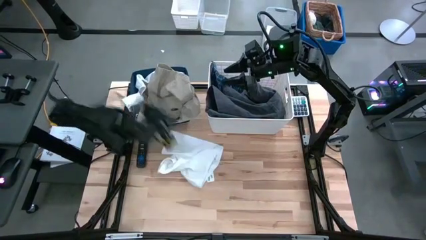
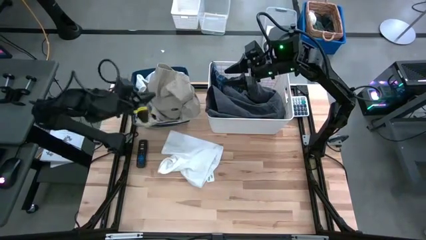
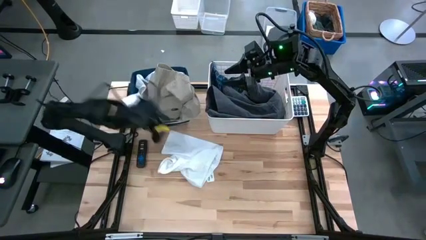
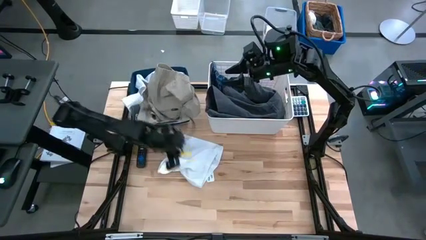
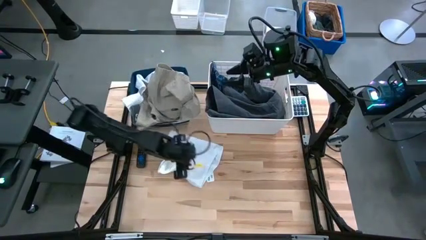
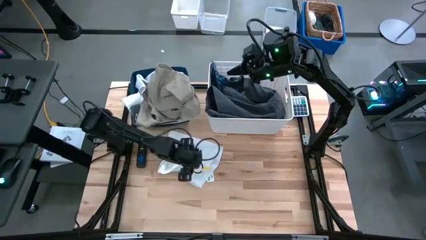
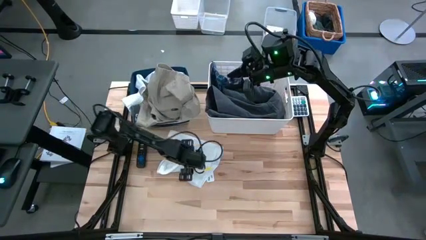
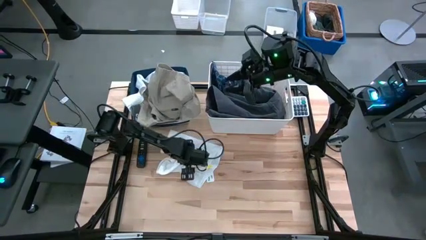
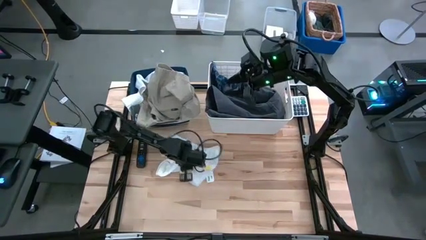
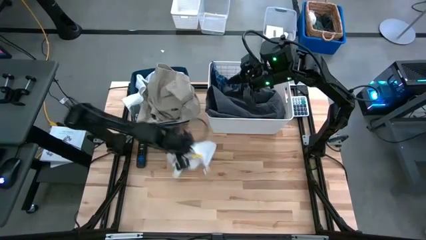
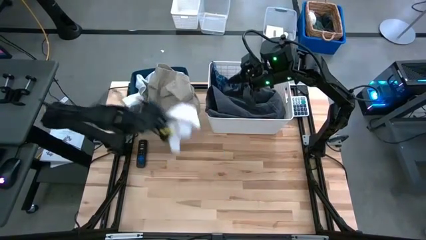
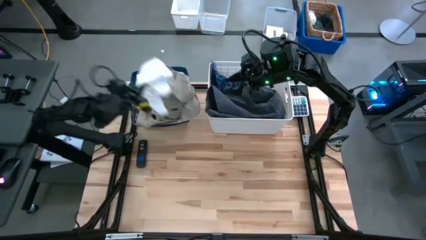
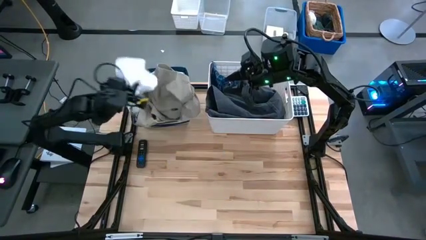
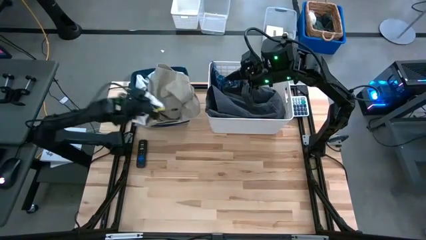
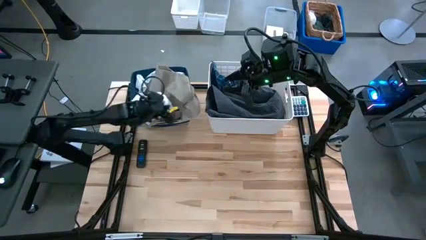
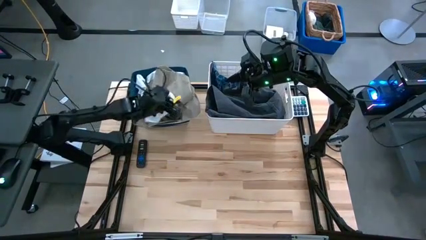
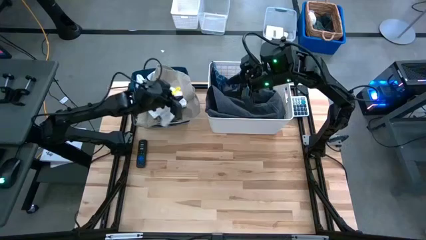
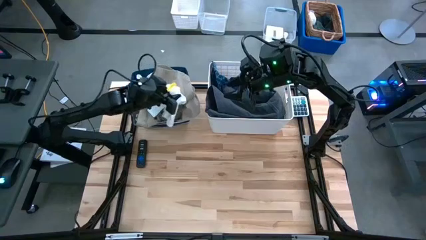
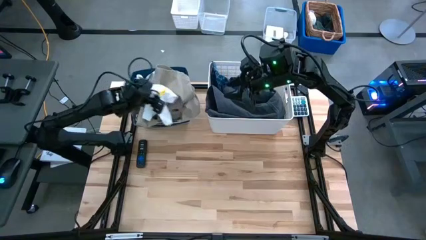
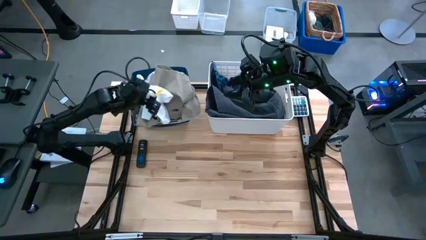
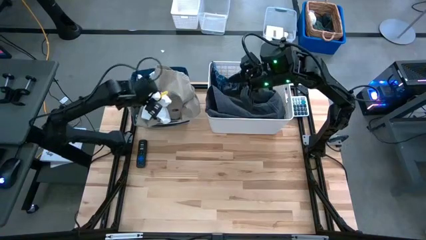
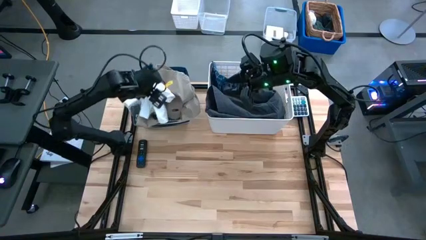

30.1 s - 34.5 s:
Task: Sort clothes
Put the white short into the blue laundry organizer

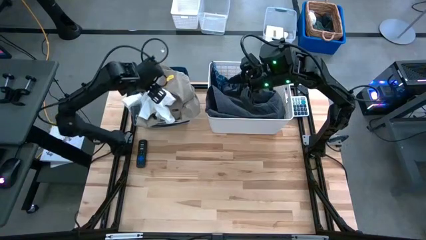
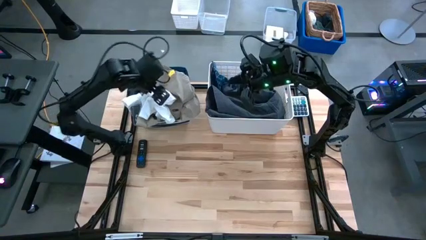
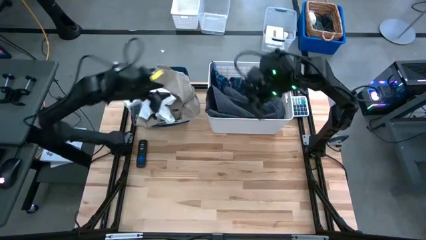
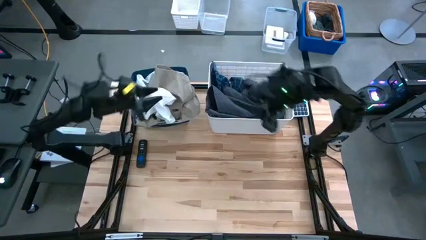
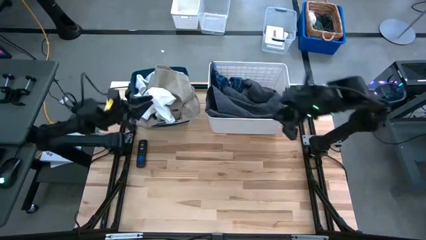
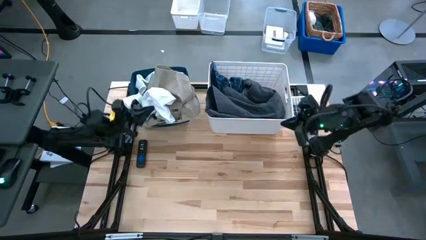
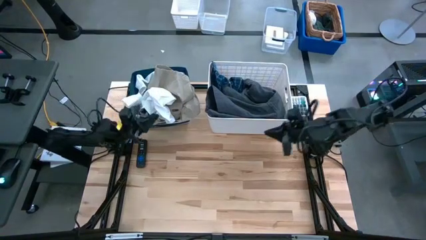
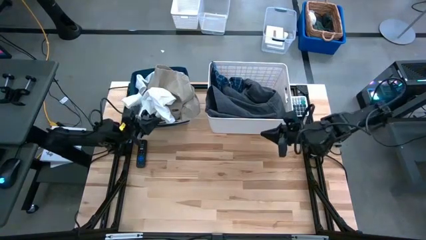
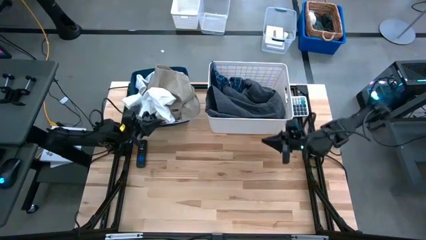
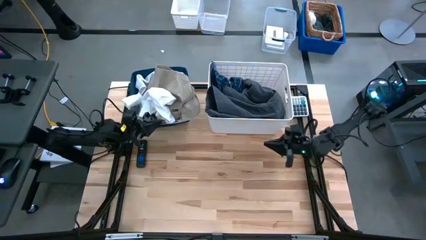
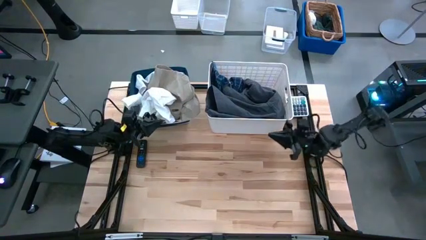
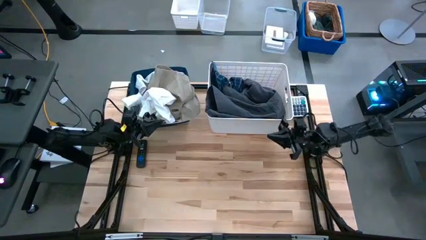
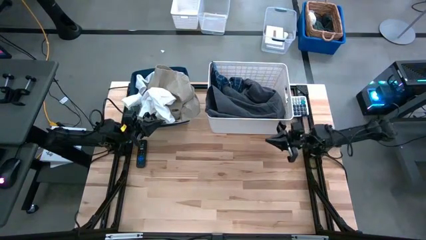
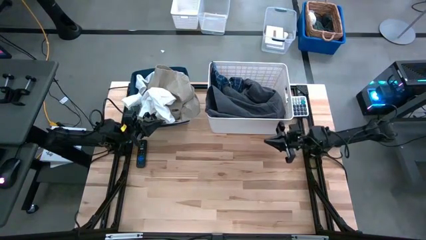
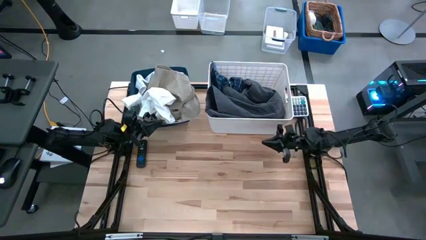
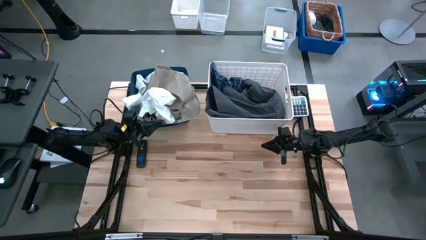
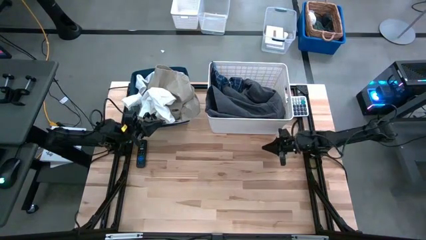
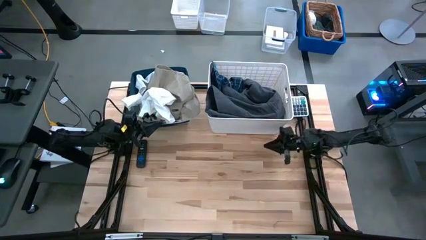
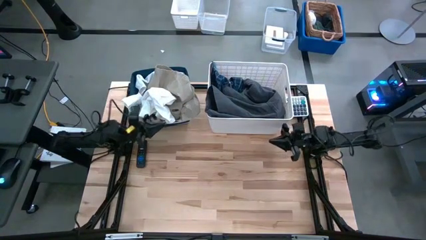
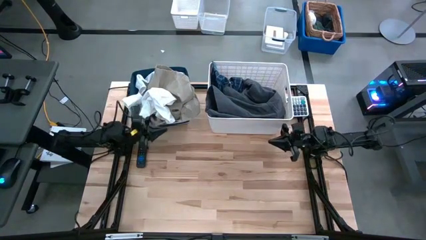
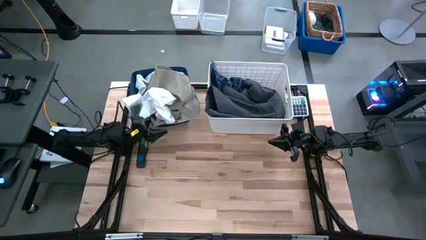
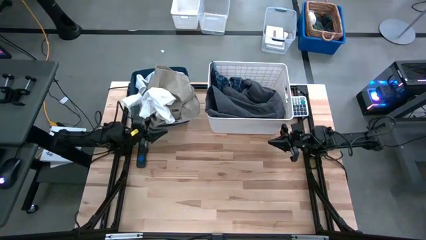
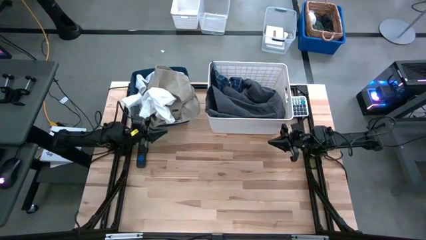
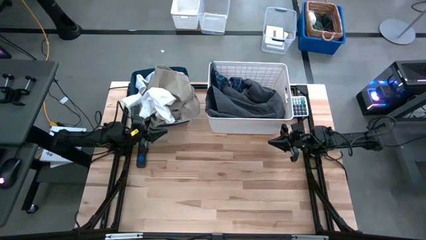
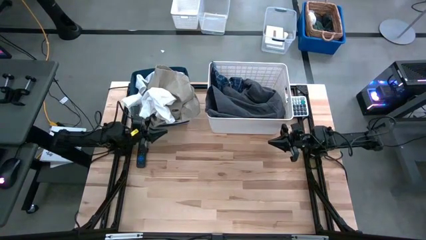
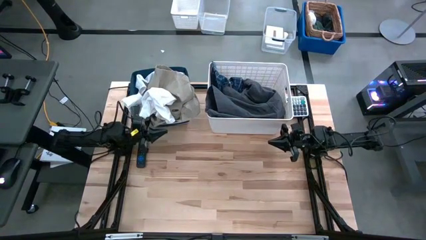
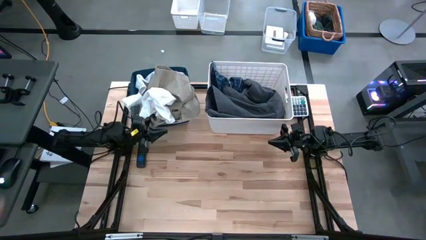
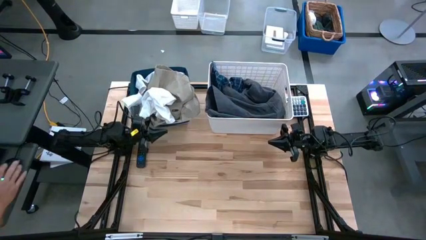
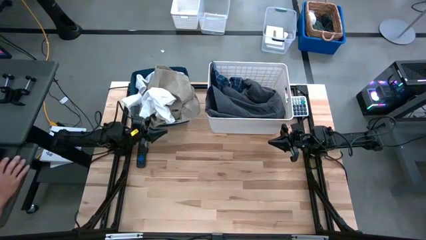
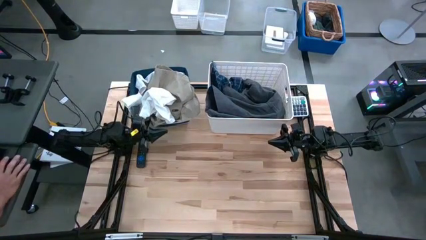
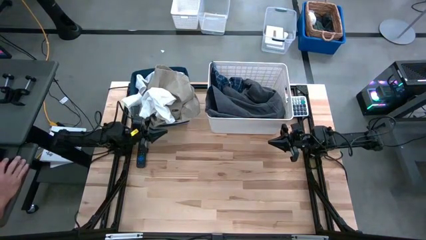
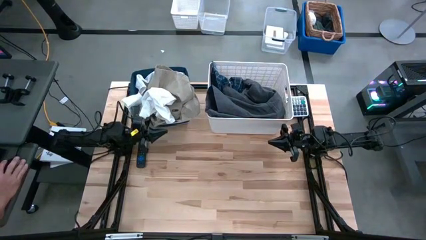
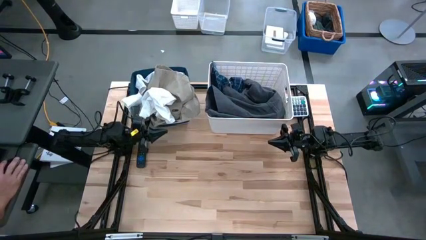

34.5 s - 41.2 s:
Return to Home Position

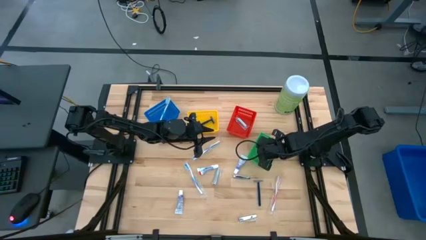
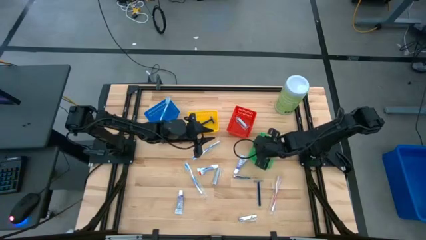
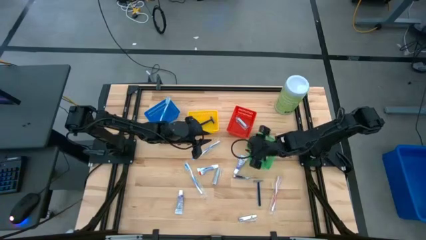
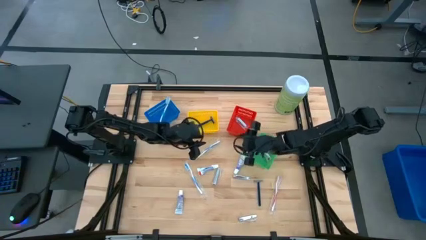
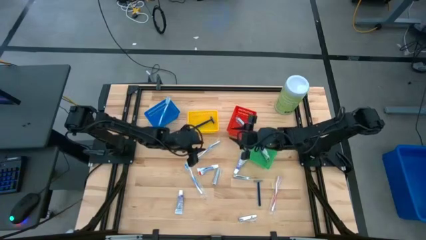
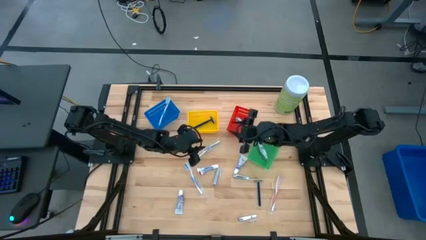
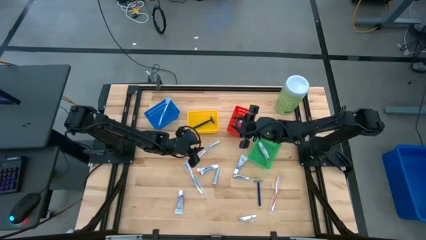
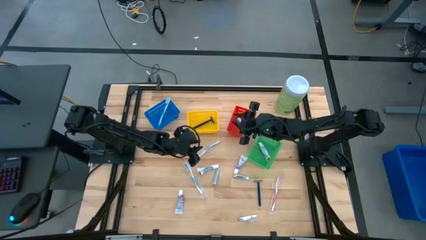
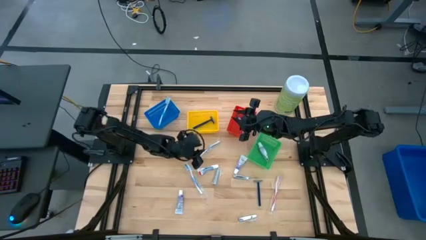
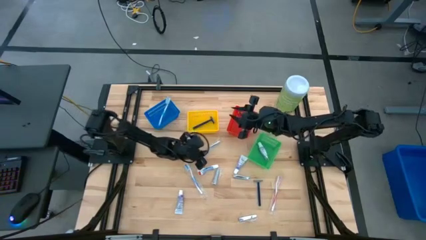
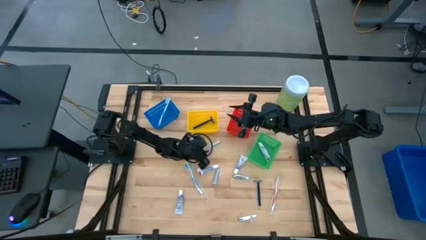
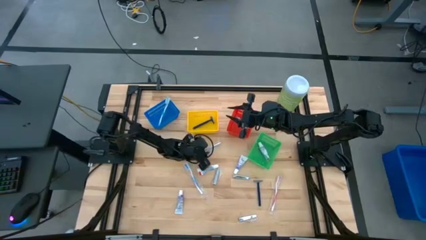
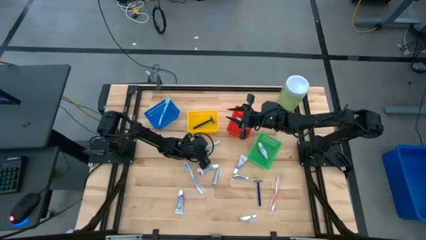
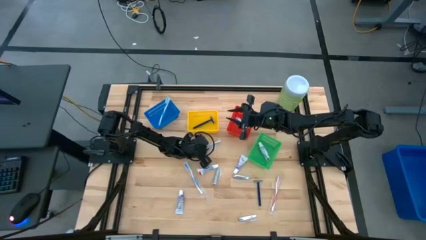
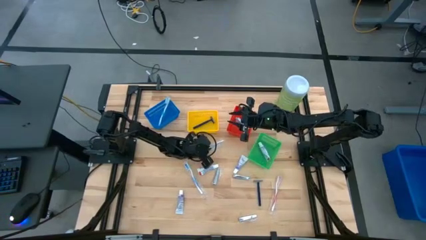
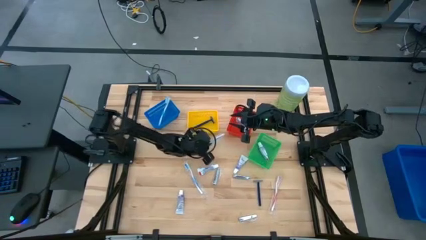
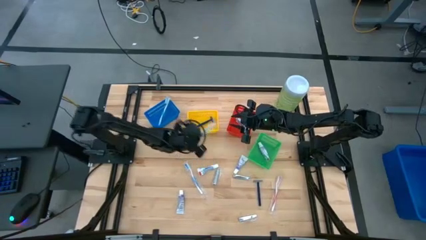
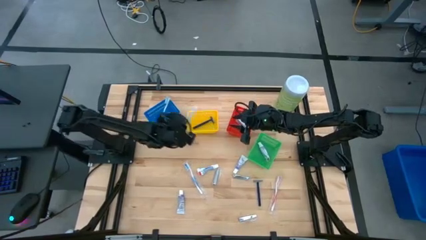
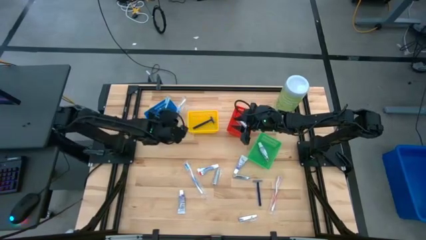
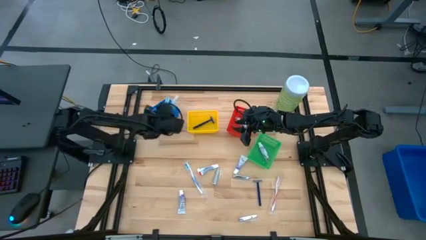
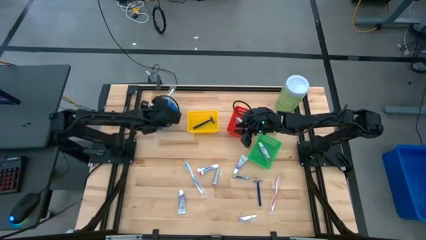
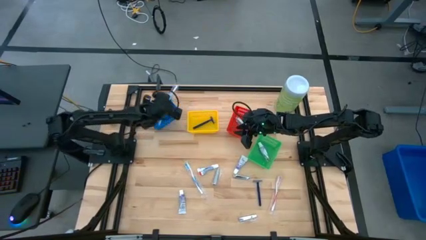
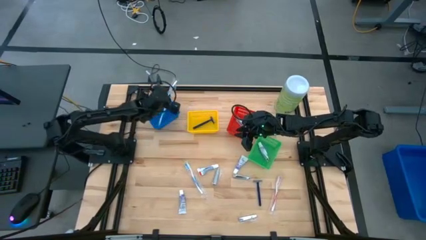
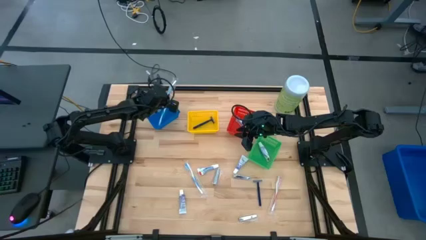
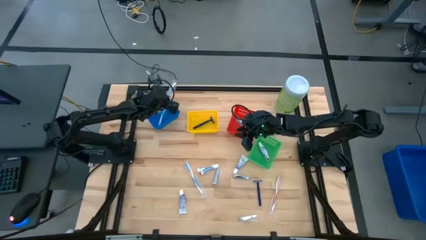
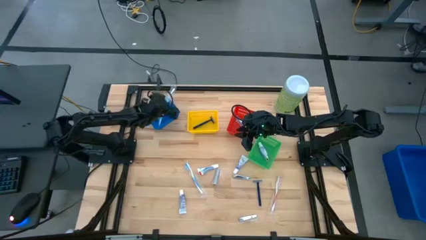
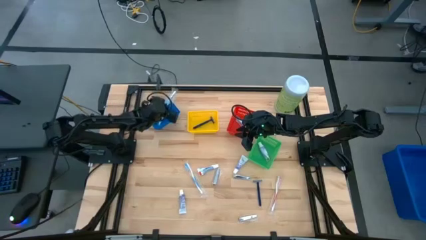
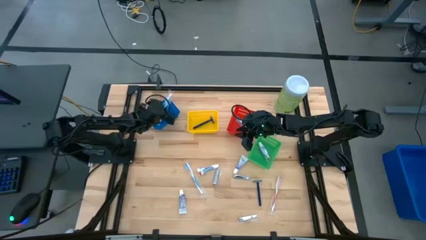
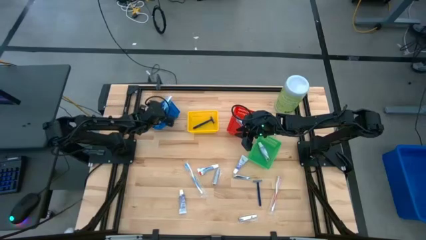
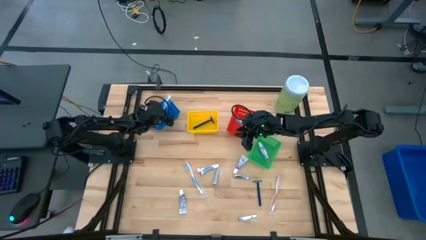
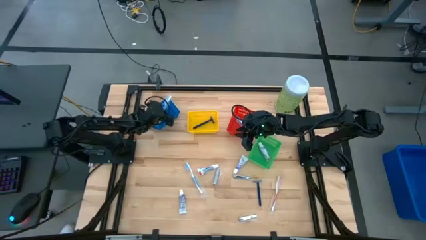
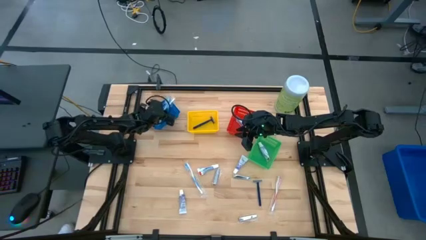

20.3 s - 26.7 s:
Task: Pick & Place Travel size toiletries
Put the blue toothbrush into the blue bin
